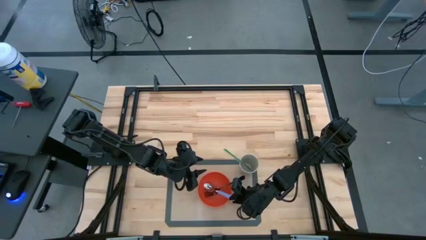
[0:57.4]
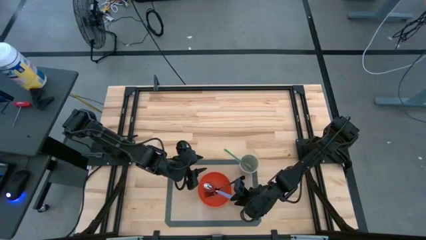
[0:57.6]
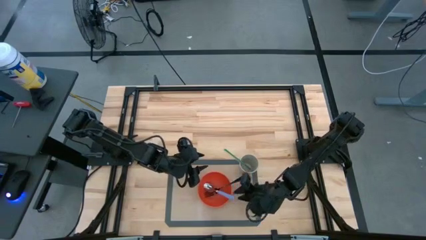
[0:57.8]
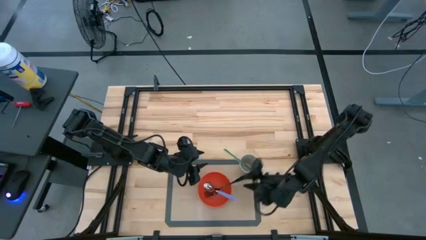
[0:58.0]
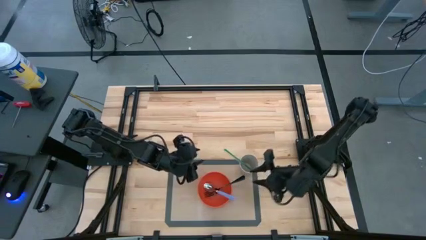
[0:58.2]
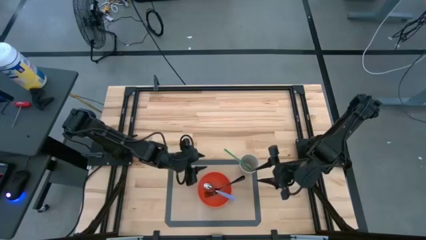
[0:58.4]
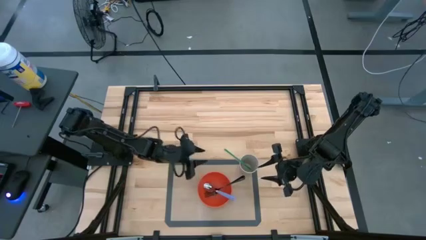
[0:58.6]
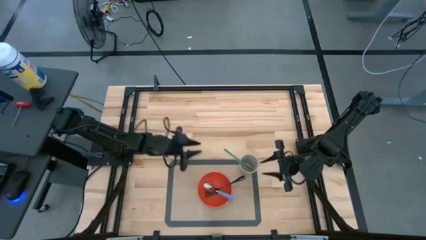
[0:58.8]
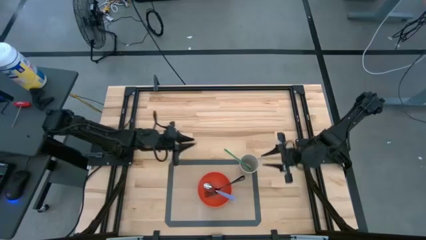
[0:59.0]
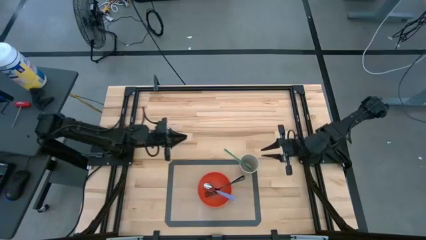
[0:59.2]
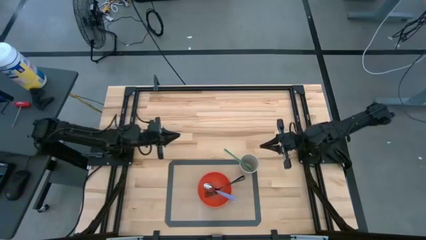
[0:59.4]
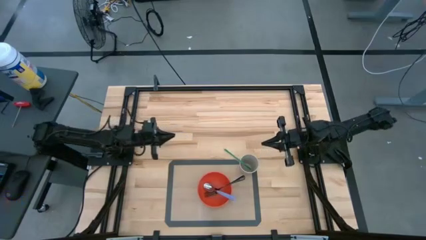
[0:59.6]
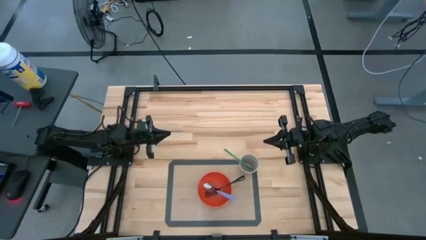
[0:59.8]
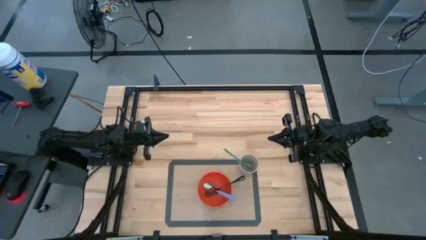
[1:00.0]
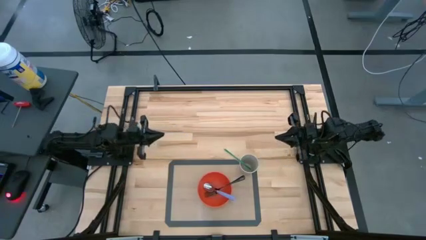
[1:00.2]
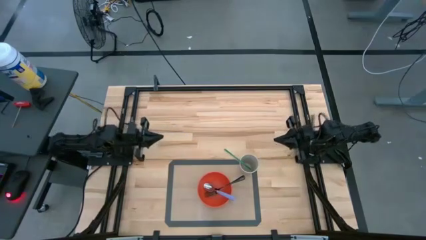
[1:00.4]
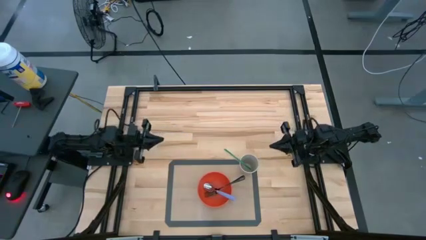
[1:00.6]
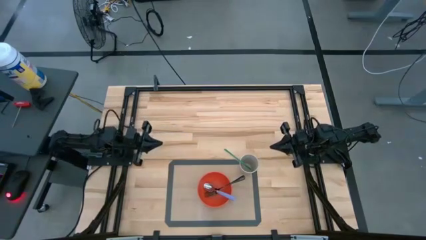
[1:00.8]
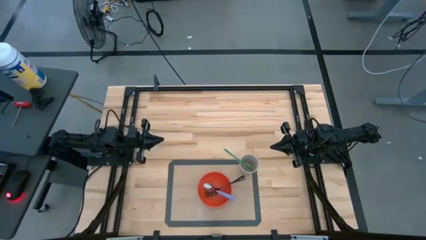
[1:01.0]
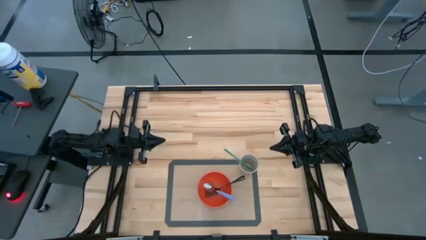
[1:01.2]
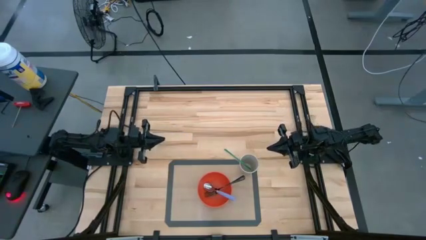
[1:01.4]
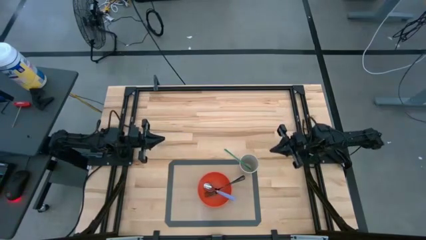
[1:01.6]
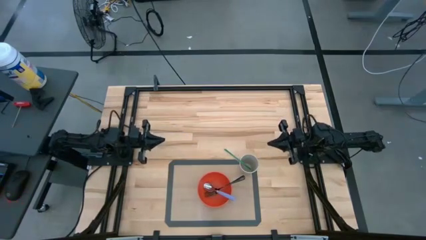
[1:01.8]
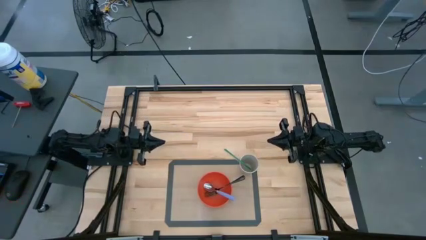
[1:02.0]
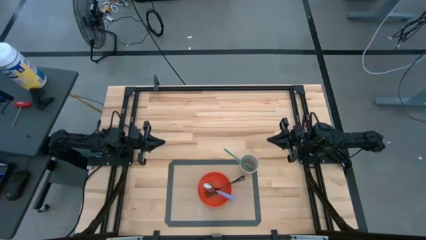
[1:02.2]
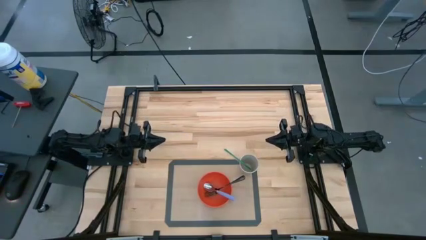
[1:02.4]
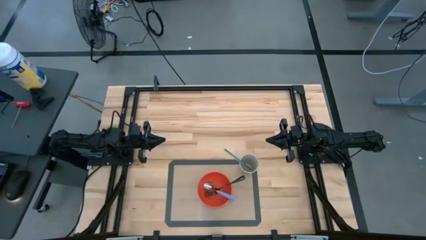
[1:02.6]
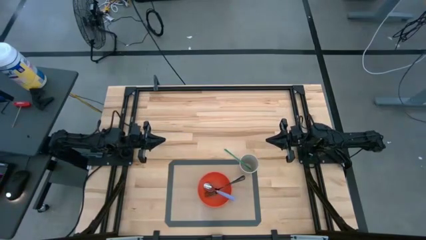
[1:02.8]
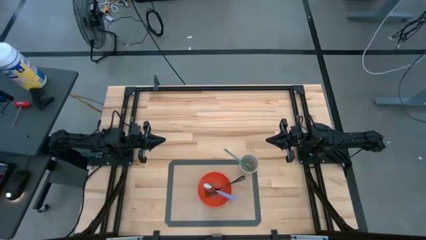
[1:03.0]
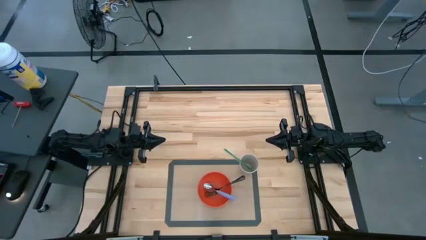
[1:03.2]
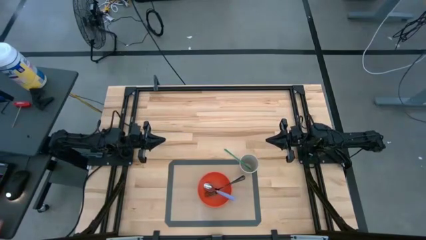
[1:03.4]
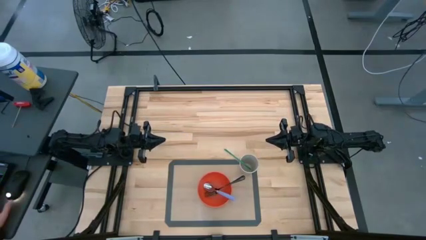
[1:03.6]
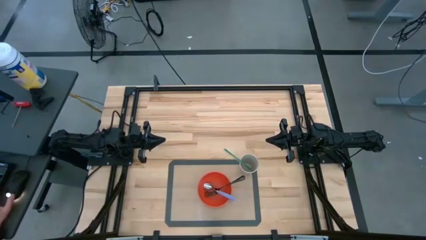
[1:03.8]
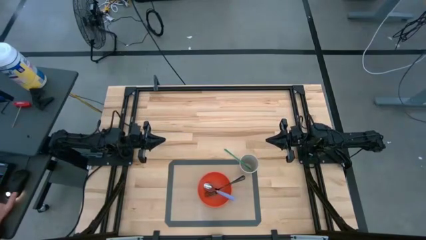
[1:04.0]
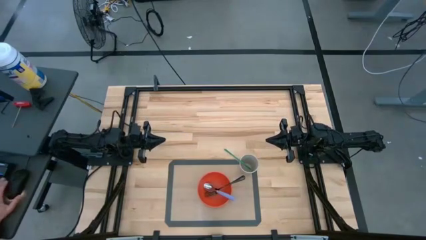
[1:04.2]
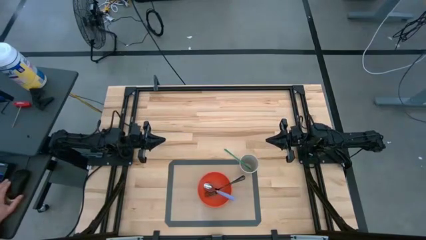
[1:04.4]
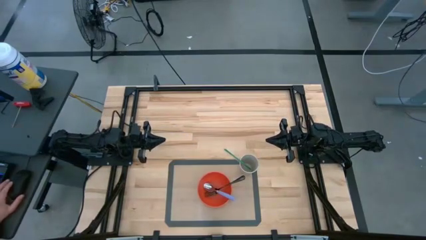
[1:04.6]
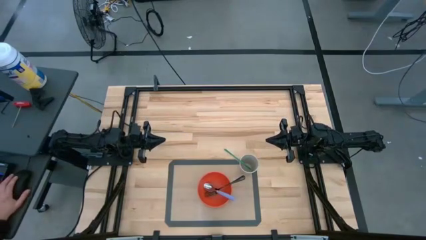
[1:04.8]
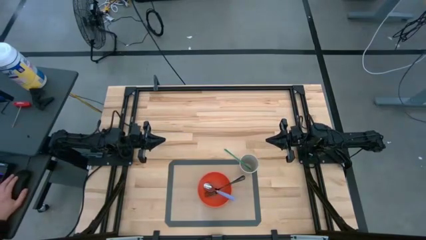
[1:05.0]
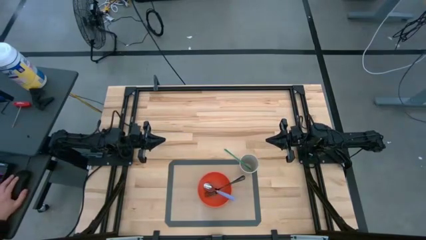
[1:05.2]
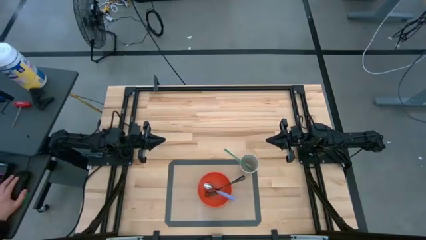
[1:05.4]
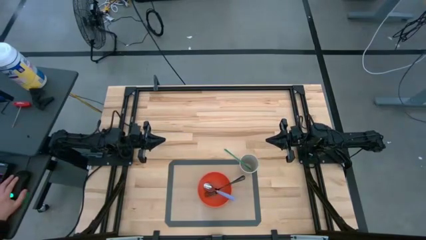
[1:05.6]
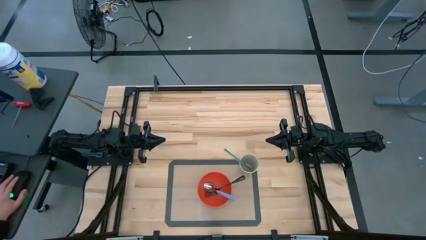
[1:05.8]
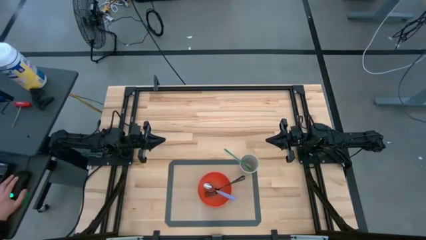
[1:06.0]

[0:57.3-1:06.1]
Task: Pick & Place Utensil
Return to Home Position

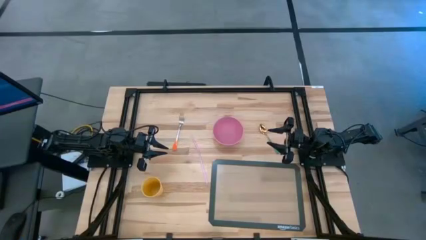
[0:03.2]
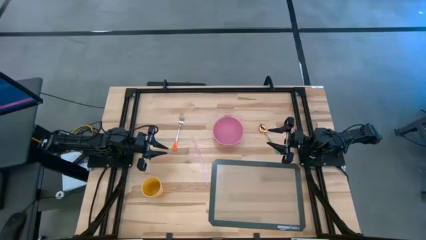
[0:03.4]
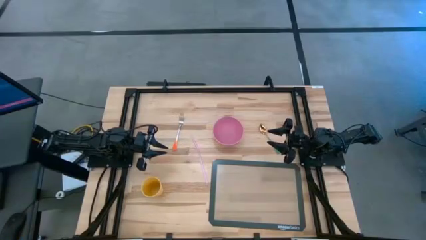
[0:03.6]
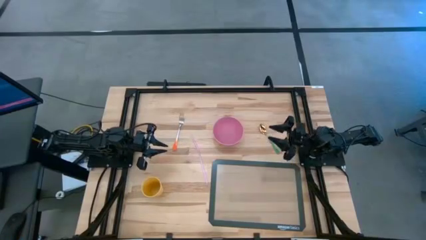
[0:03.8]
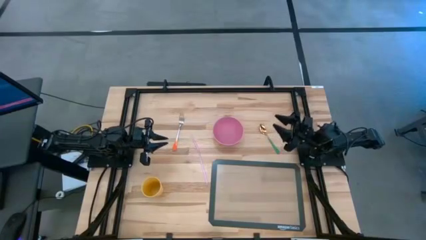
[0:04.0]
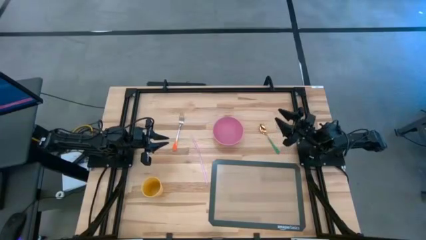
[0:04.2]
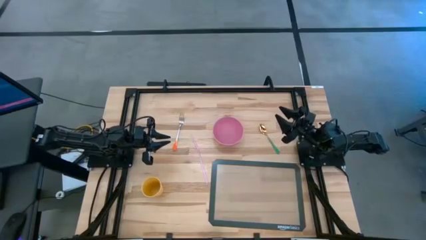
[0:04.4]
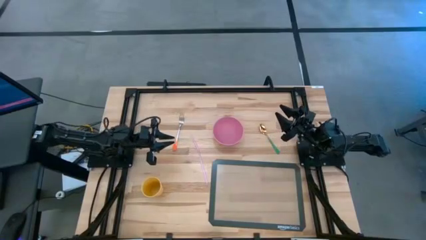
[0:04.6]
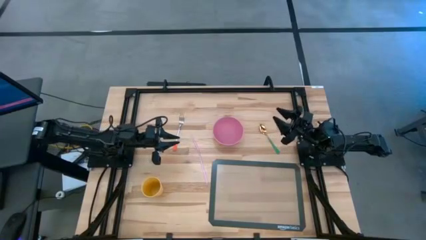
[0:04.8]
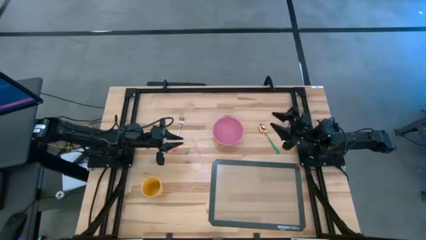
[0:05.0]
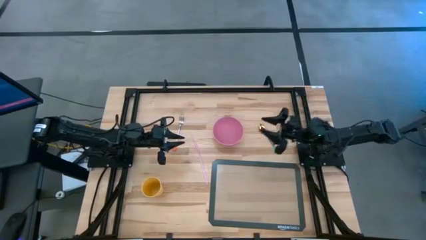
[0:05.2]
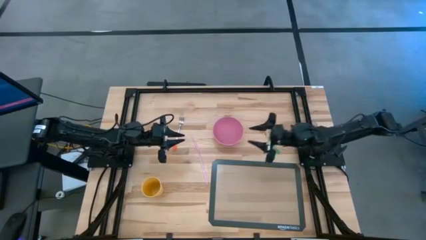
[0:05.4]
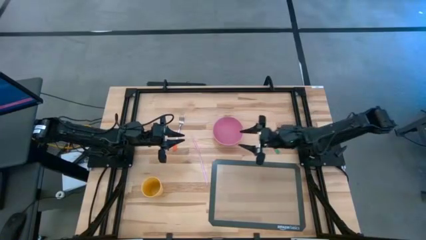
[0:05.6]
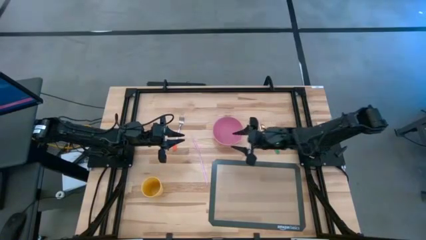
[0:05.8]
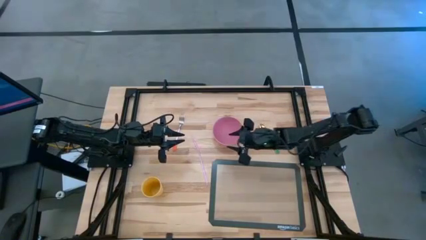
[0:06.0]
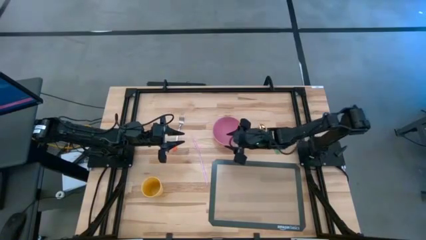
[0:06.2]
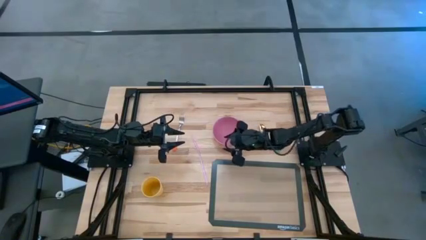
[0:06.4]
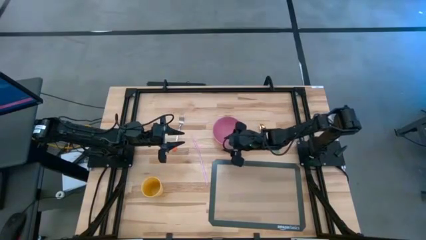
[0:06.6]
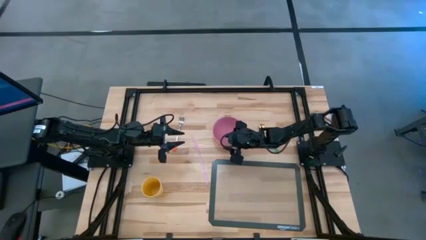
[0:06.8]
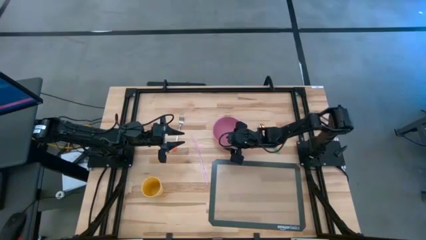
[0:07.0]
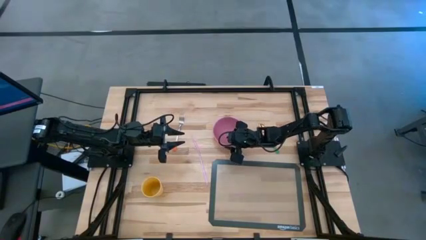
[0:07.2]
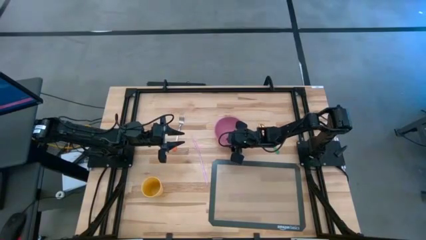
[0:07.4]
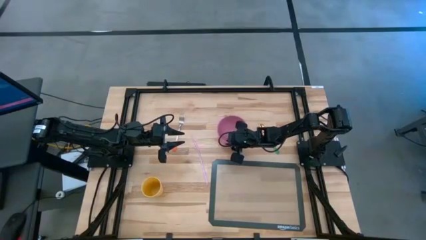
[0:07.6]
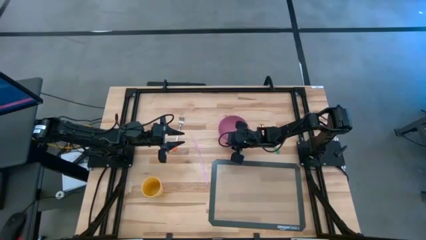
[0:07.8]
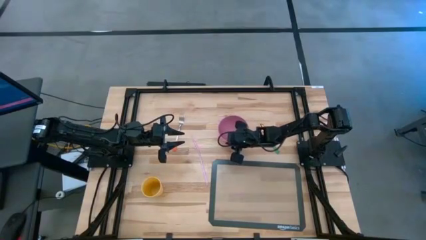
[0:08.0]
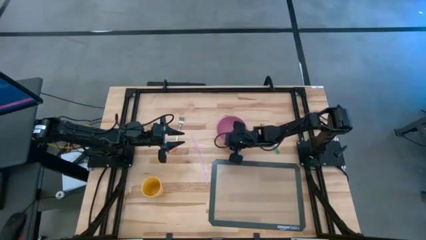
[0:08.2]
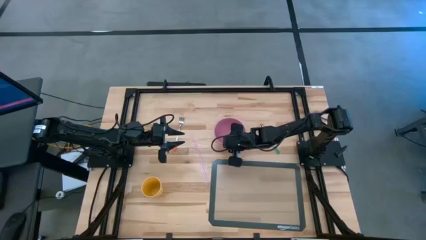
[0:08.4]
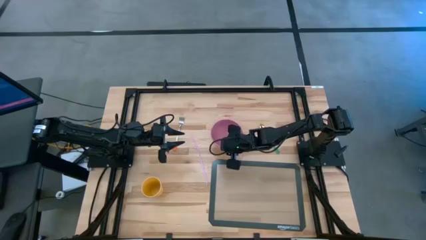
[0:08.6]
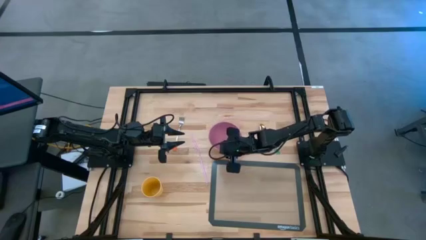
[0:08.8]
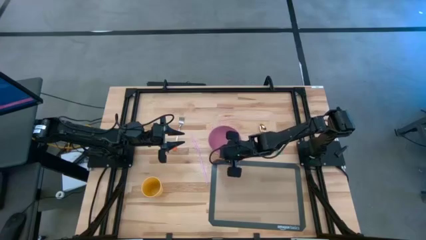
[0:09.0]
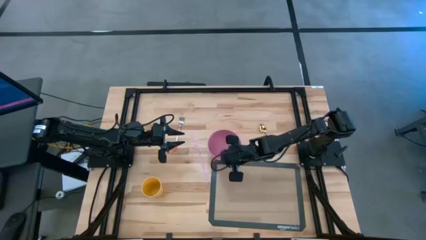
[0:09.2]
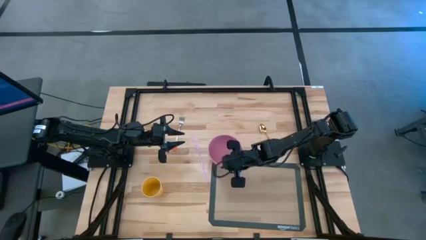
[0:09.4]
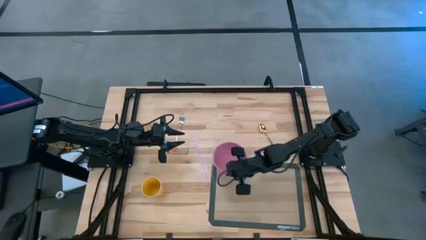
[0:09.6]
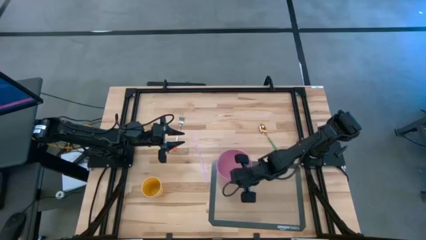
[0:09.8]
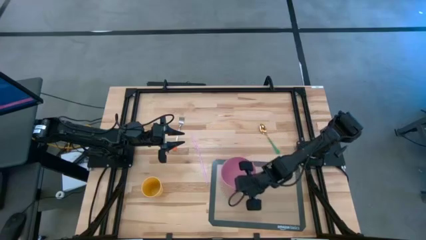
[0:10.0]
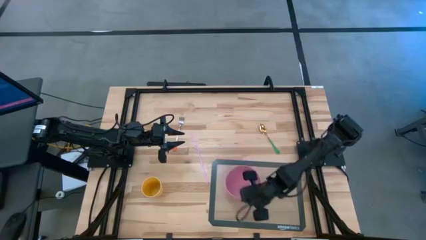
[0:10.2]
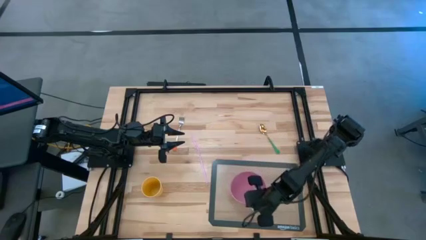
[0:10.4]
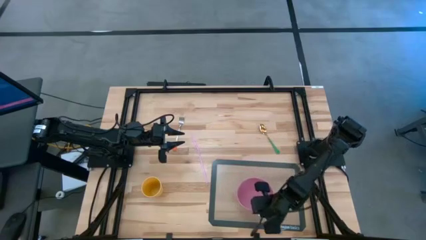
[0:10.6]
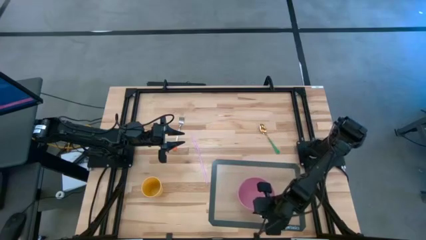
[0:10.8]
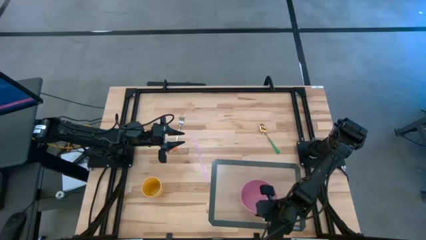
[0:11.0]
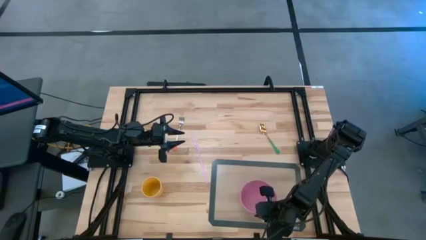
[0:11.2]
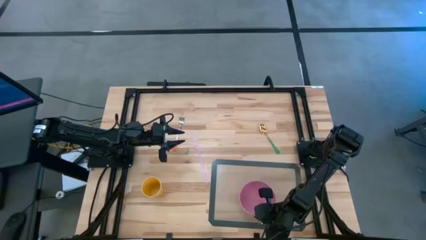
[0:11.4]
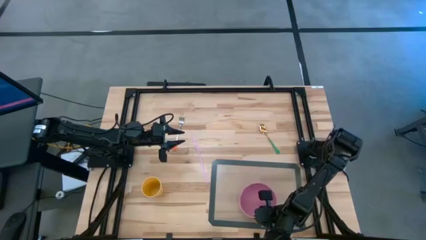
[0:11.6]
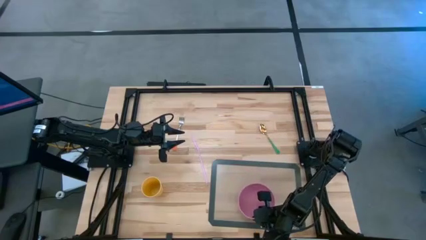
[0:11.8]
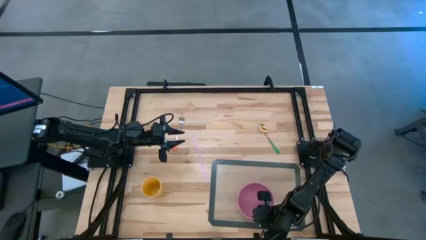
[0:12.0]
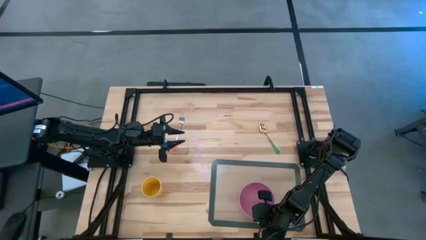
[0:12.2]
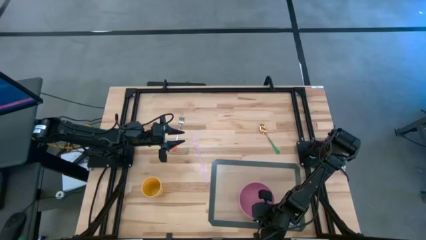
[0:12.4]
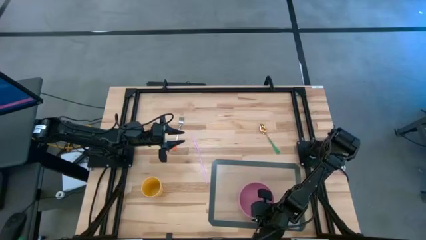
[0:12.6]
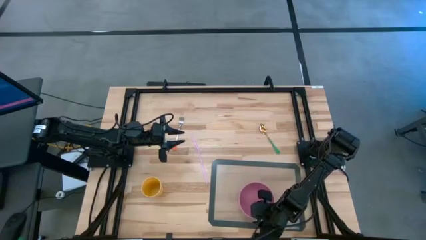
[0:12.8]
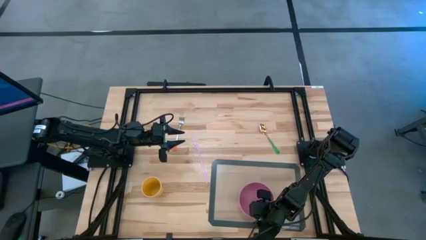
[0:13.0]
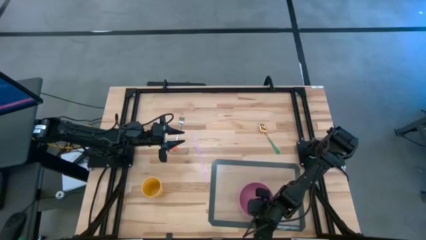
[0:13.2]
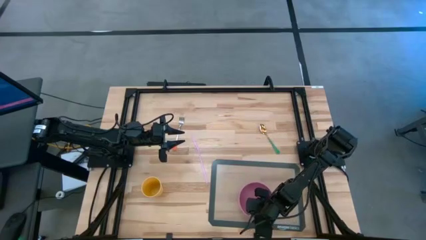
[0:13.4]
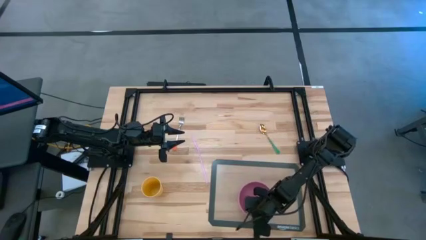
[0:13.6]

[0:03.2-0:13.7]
Task: Pick & Place Utensil
Put the pink bowl on the transparent placemat
